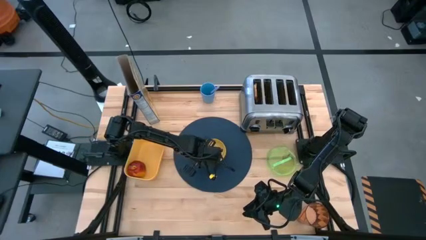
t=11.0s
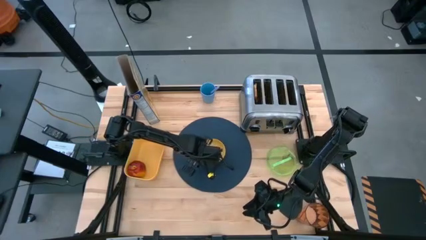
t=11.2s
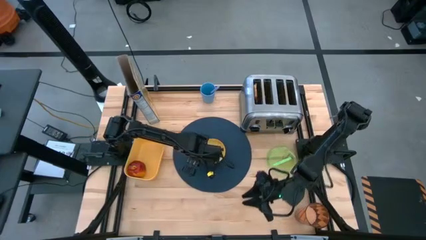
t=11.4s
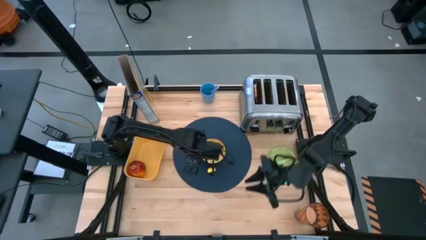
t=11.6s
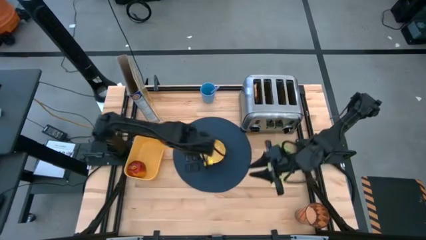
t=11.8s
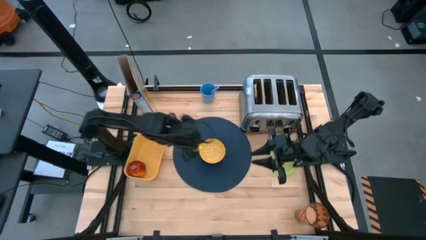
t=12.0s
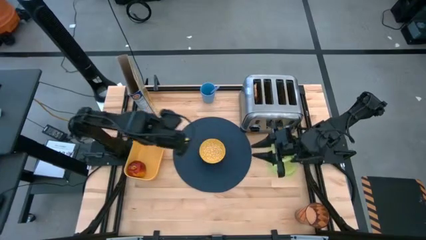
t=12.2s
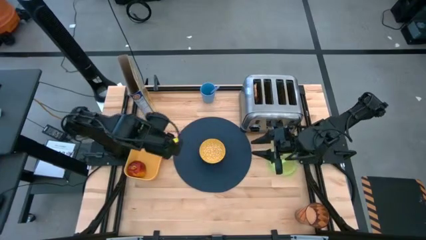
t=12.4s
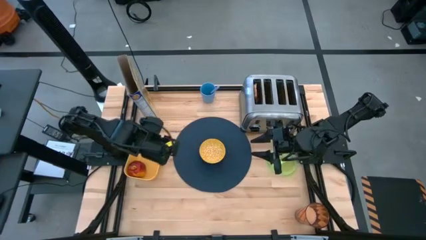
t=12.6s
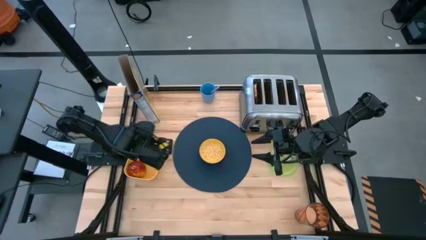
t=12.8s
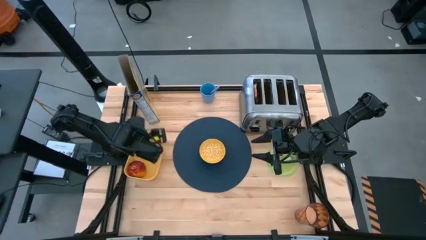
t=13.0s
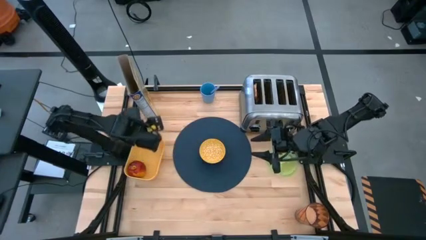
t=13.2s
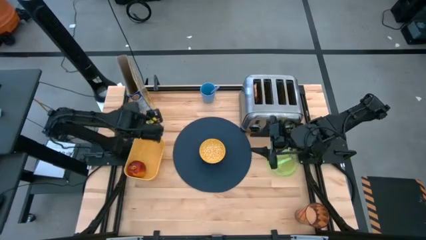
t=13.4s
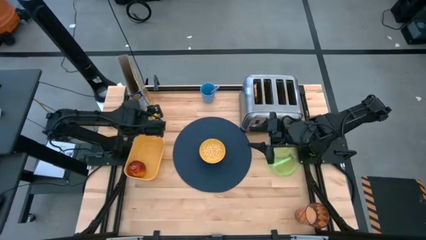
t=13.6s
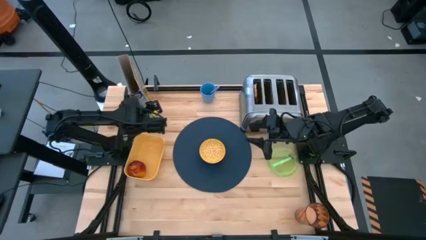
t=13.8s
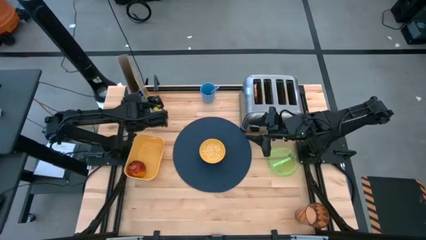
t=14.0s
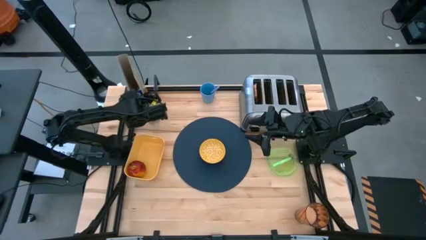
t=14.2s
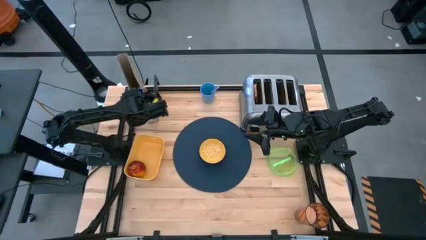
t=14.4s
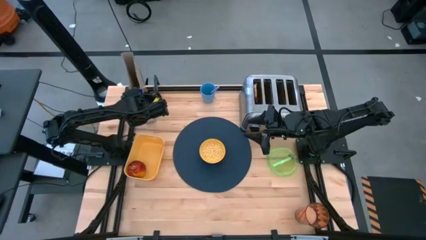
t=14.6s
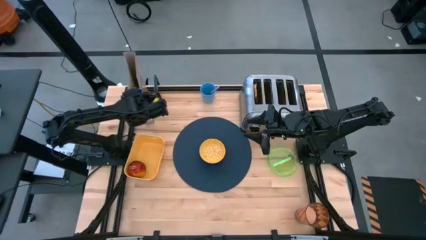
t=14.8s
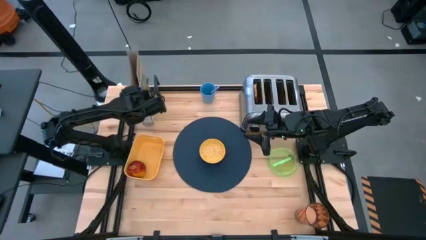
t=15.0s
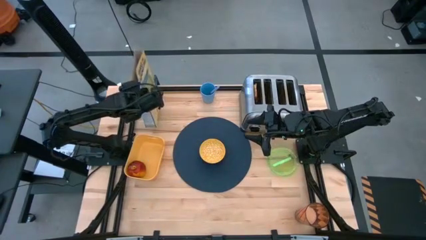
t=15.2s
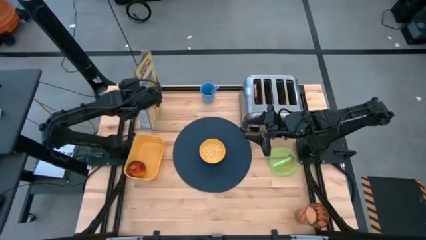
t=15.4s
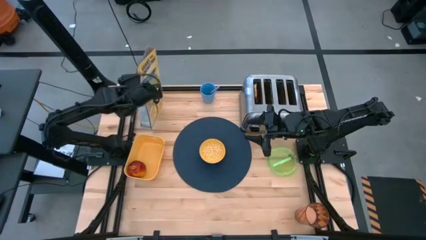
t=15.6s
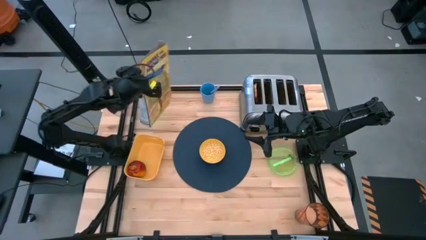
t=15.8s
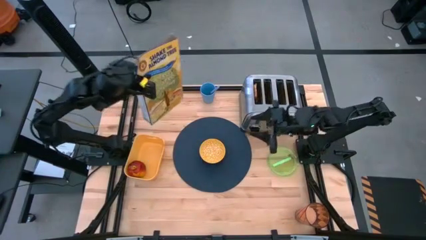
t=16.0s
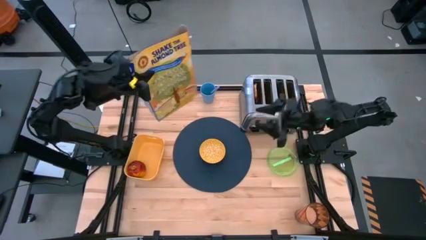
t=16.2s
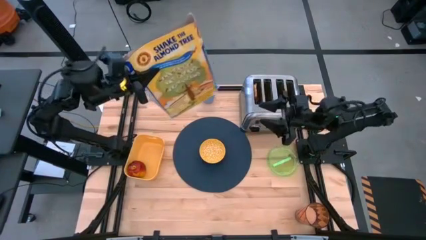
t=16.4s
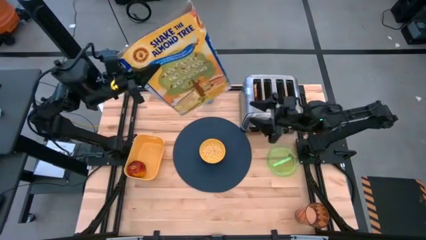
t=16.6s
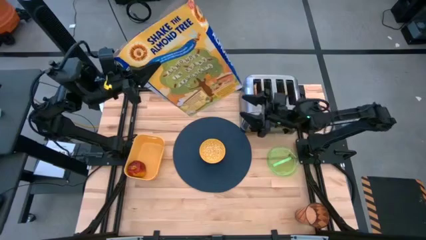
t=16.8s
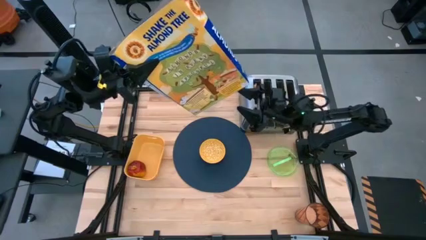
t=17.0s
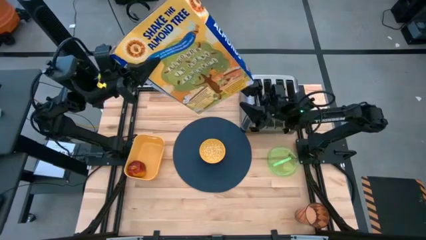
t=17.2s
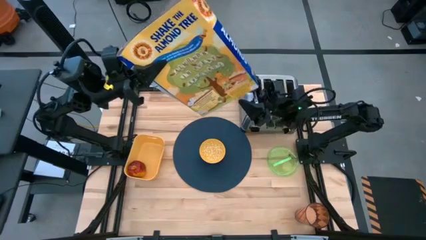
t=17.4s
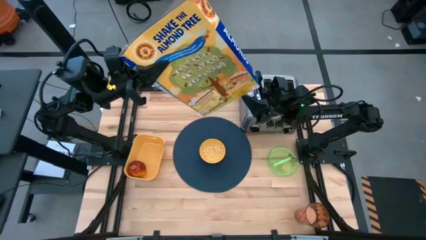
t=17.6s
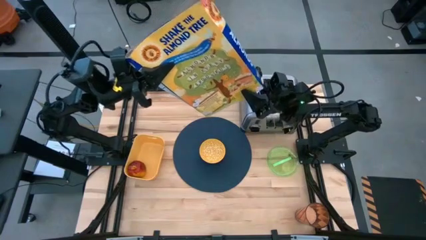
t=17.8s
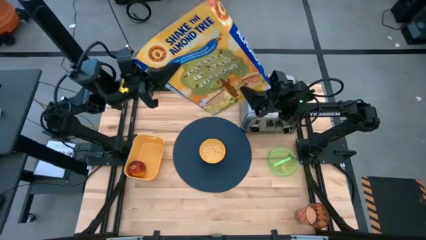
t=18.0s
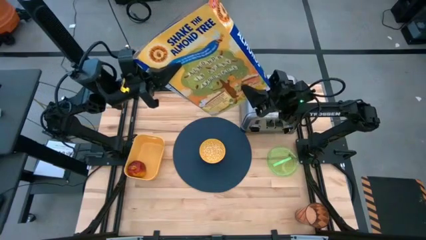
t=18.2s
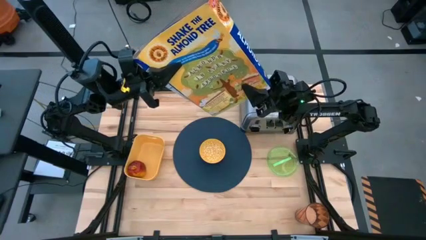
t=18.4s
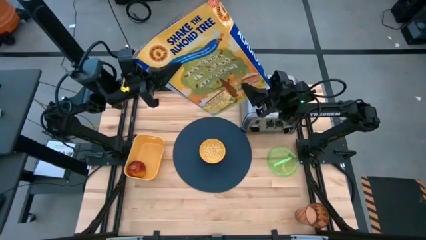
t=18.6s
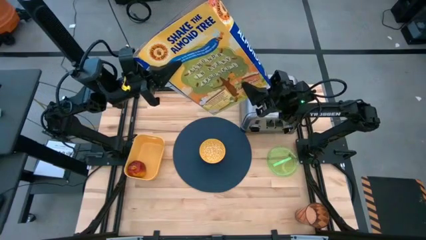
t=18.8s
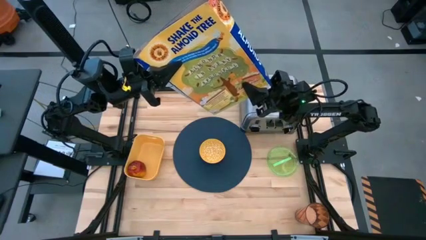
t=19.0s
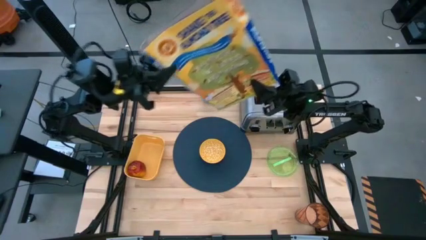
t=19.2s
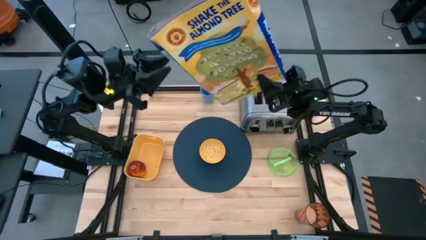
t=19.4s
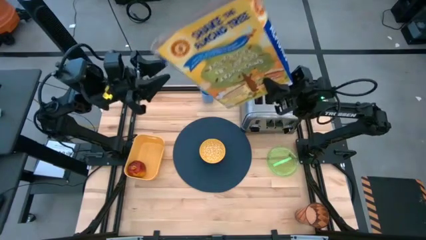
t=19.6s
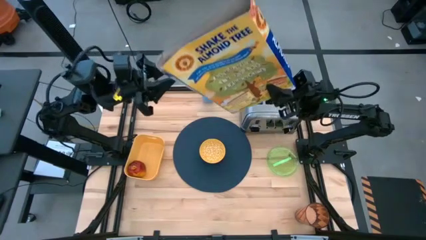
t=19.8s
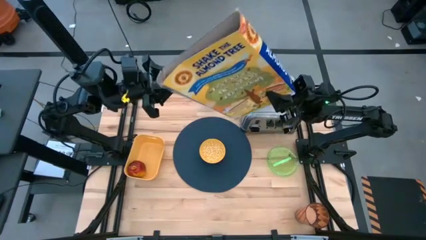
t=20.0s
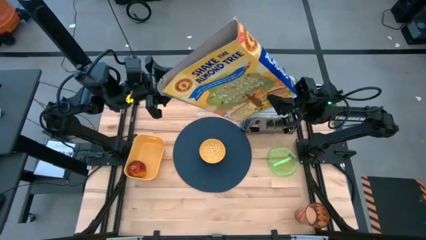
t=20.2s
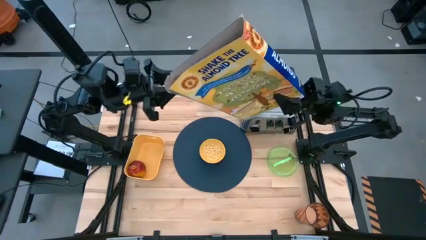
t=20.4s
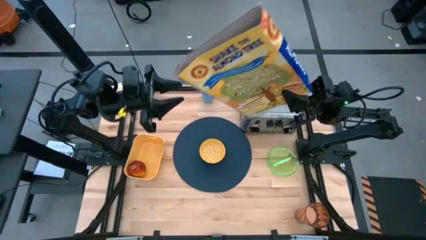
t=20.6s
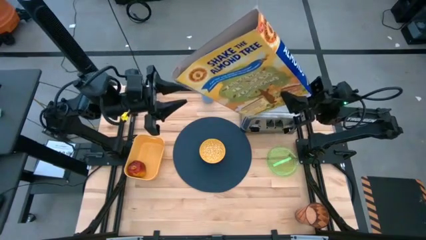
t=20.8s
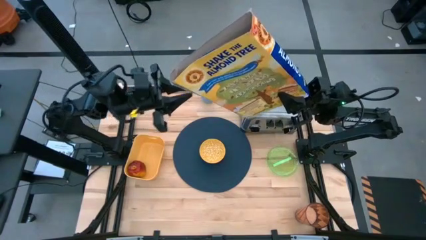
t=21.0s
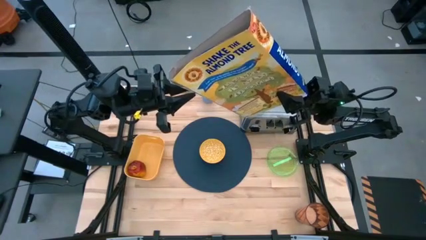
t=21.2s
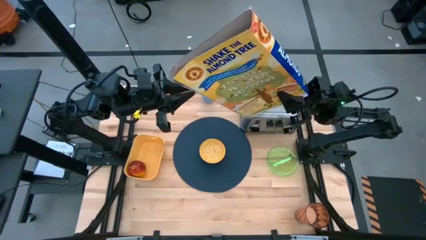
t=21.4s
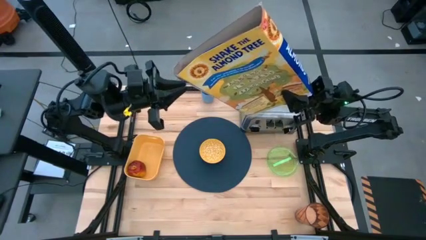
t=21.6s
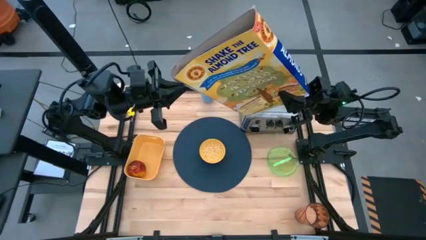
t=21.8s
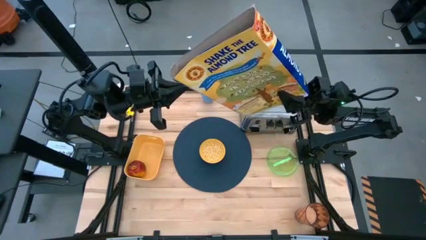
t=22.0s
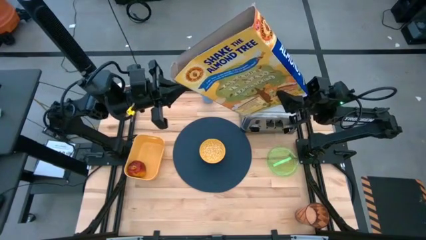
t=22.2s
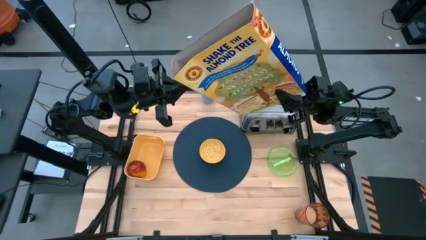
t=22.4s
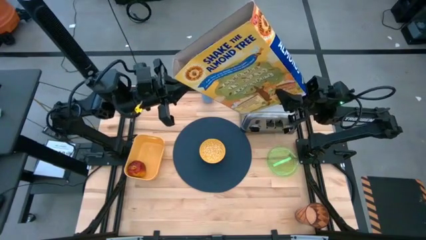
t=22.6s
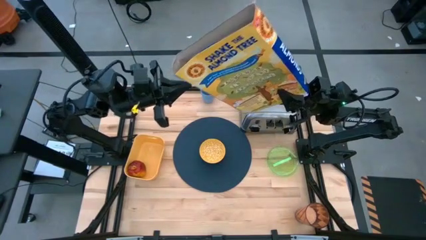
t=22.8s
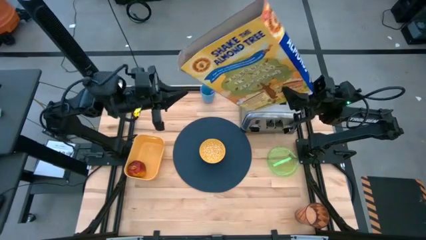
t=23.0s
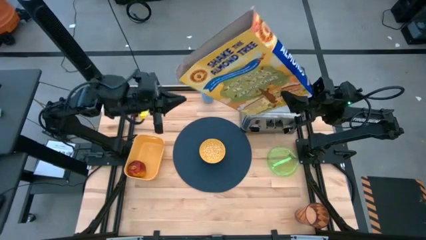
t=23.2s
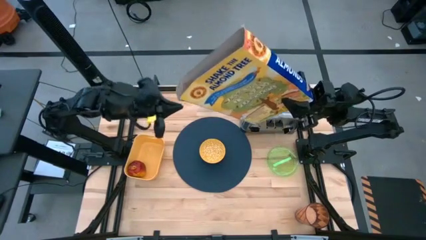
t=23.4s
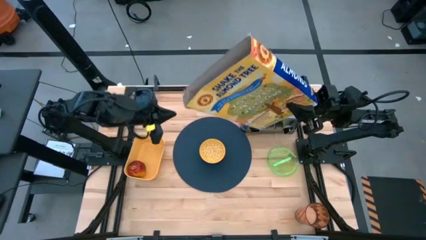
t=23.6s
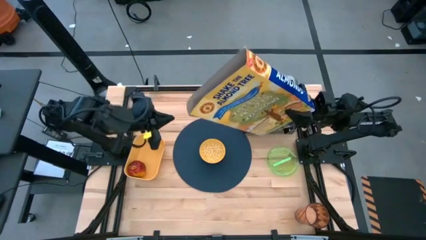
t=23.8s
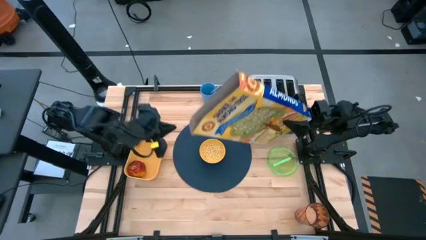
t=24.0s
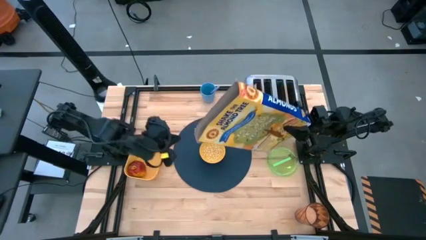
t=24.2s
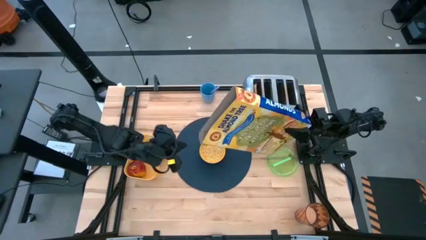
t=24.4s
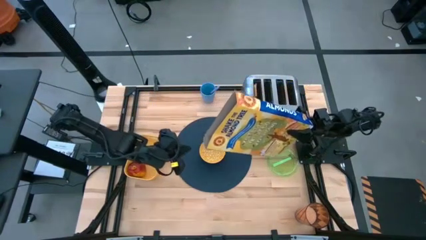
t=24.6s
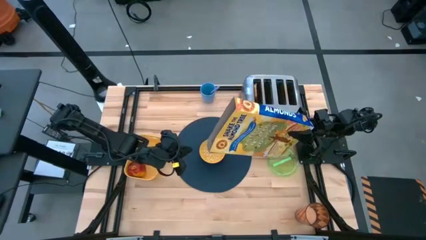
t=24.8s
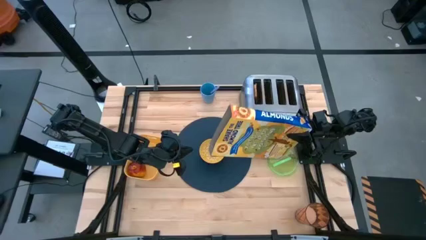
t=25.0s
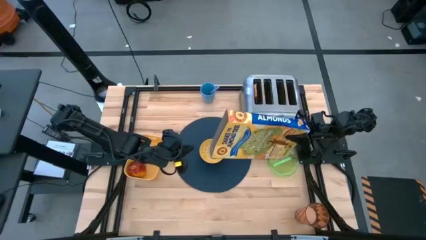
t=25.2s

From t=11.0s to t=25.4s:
Task: Arrange a breakfast setting
Pour the cereal from the cereal box into the bowl

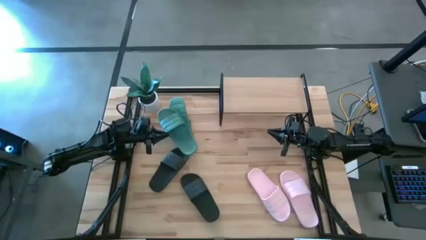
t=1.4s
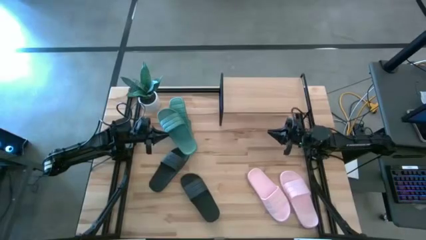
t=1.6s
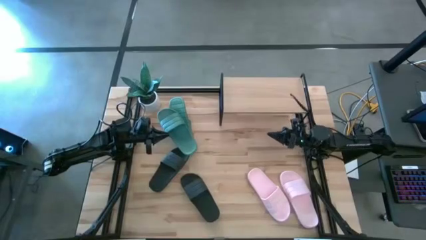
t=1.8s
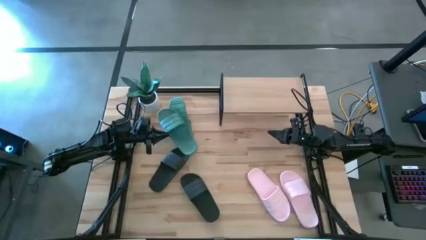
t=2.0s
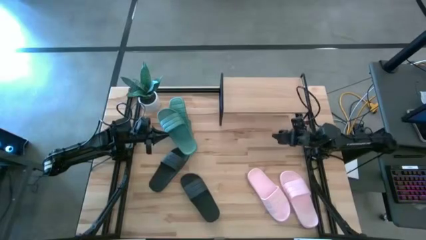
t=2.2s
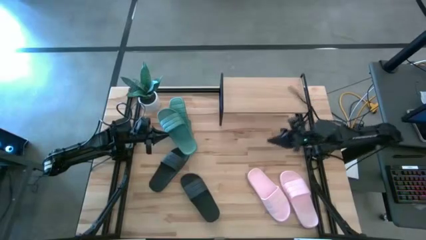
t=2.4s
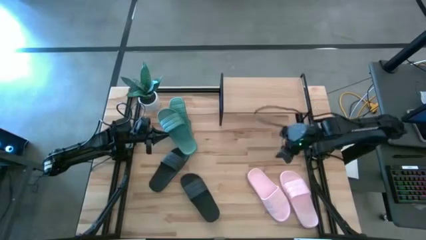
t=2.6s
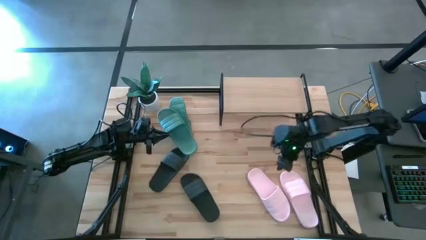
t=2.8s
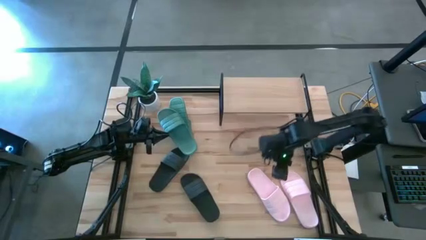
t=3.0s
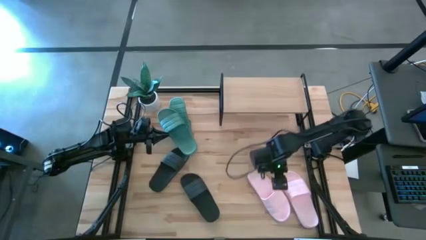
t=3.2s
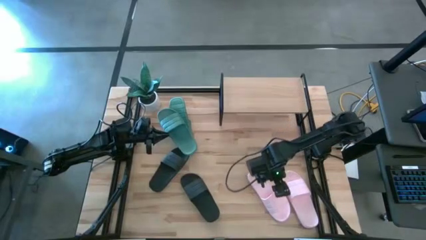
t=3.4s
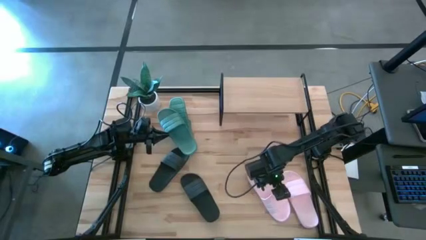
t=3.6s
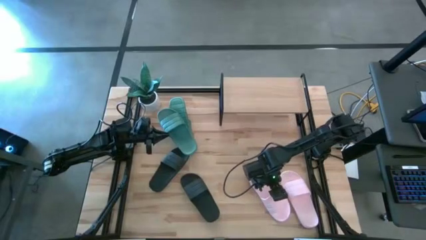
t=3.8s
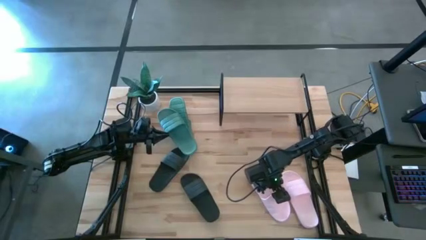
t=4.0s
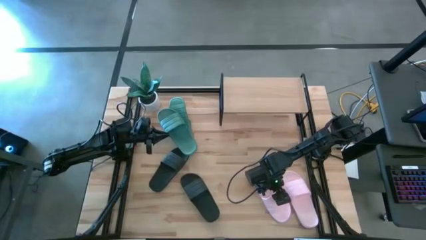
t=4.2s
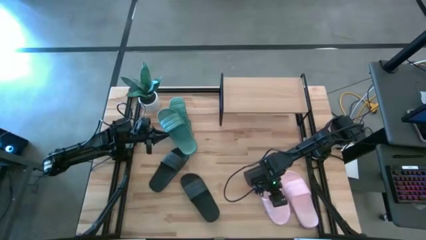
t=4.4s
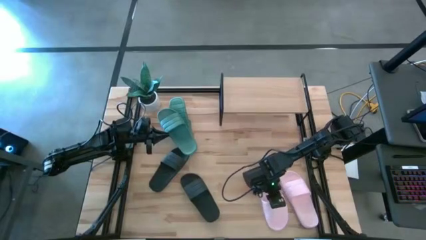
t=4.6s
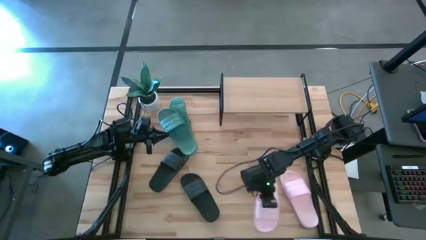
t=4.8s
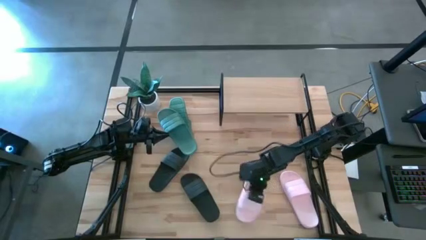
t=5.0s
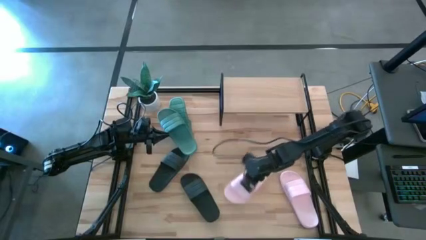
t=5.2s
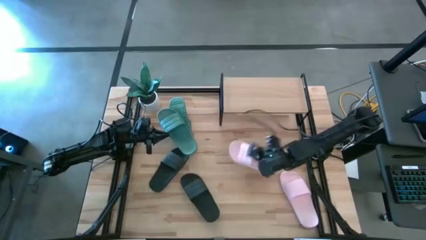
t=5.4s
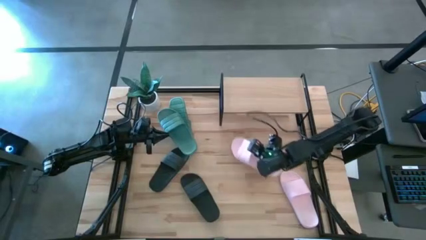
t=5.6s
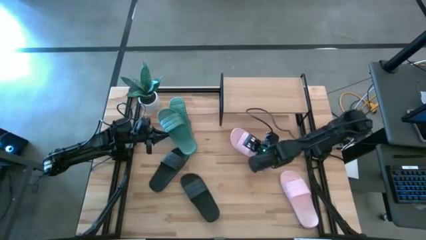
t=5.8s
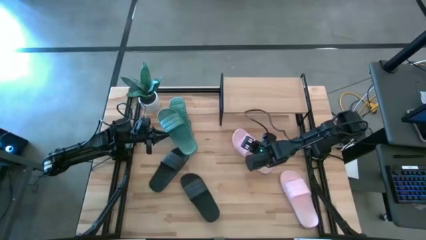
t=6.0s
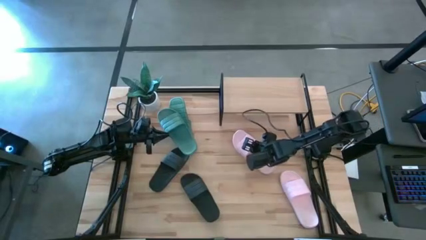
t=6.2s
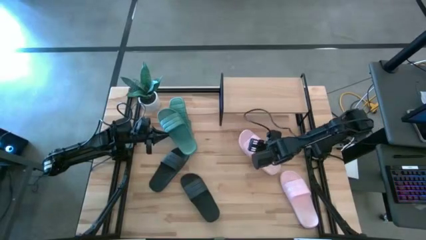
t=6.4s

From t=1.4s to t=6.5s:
Task: Pick and place slides into the shelf
Put the left pink slide under the shelf
